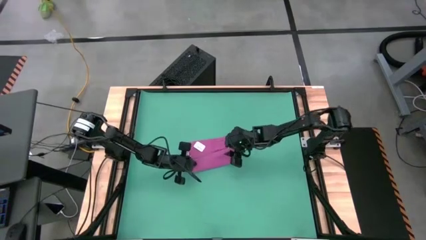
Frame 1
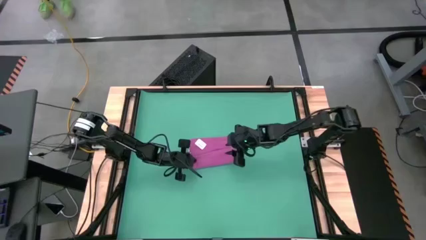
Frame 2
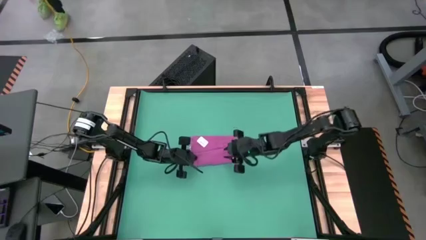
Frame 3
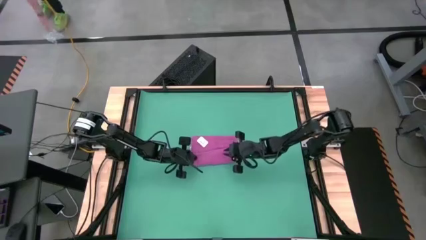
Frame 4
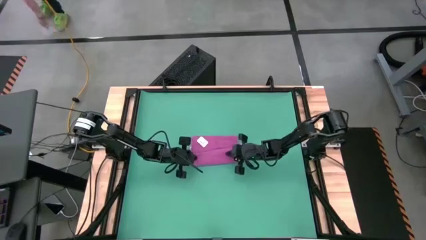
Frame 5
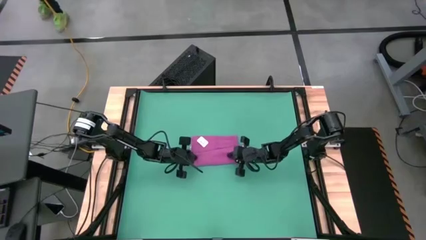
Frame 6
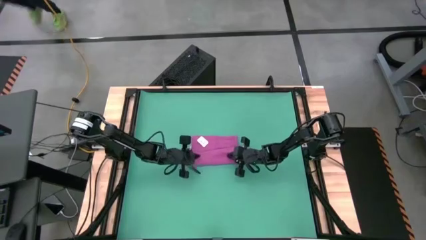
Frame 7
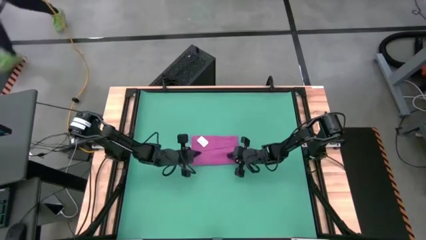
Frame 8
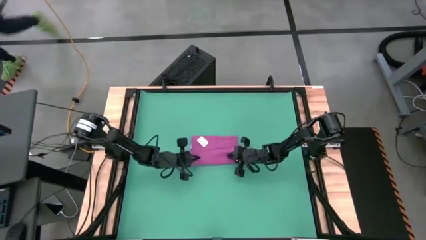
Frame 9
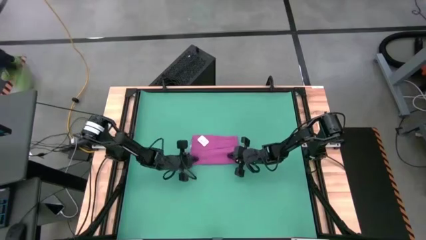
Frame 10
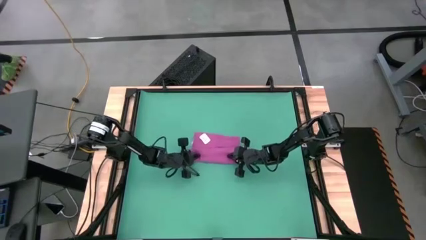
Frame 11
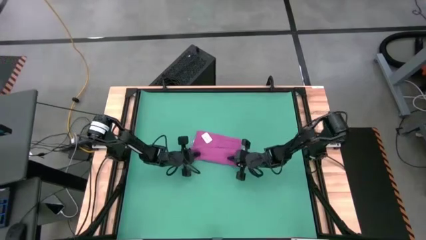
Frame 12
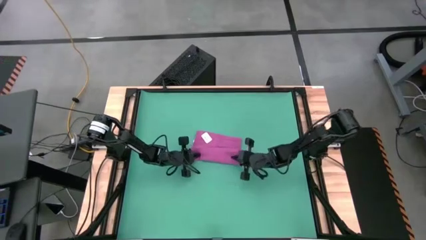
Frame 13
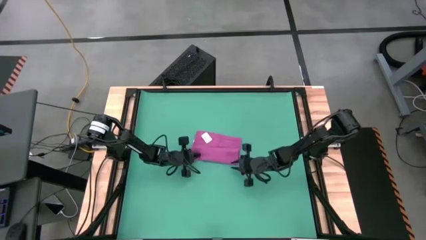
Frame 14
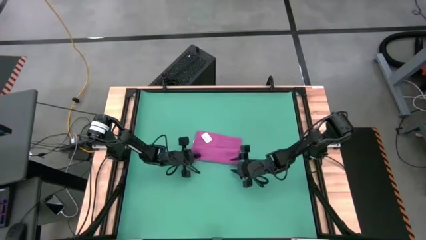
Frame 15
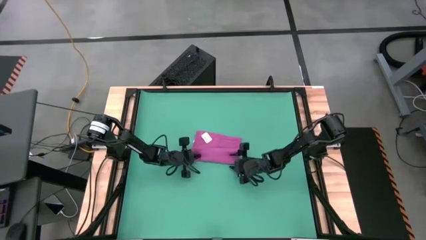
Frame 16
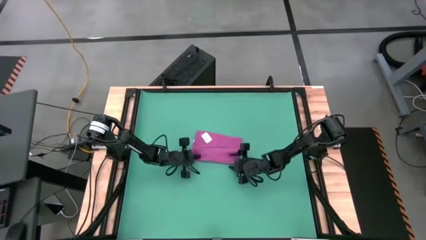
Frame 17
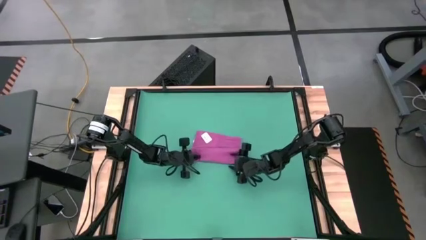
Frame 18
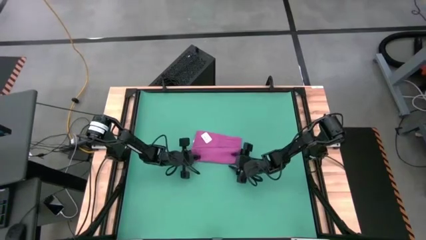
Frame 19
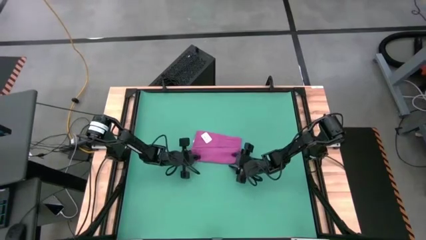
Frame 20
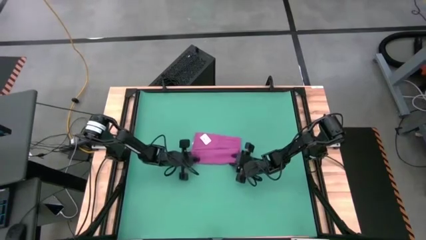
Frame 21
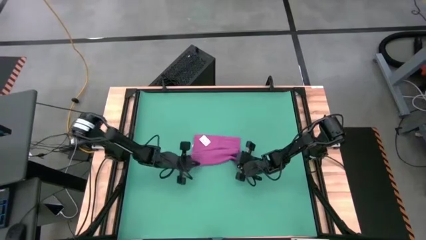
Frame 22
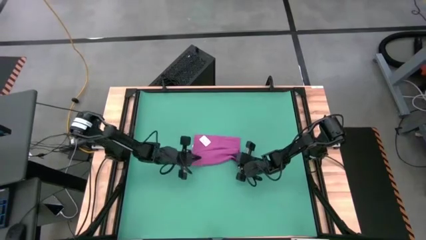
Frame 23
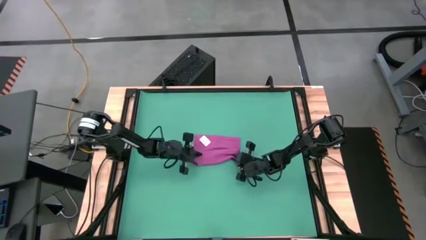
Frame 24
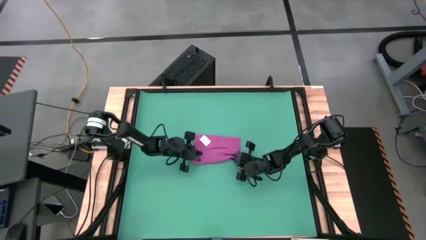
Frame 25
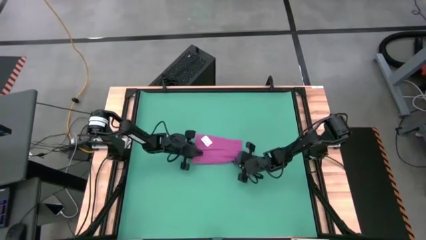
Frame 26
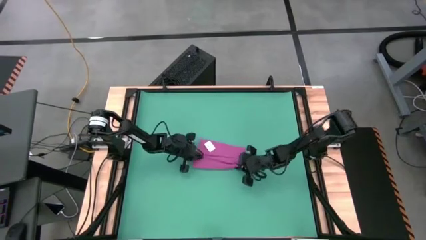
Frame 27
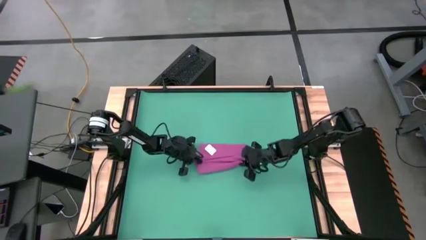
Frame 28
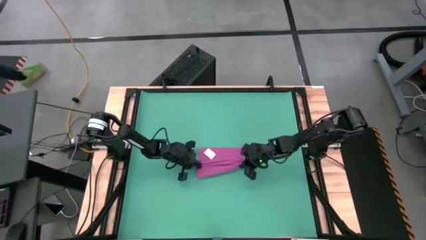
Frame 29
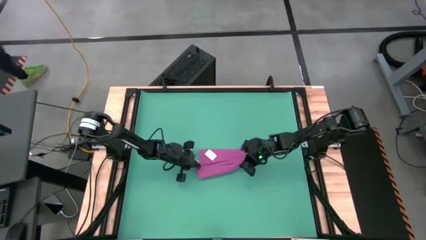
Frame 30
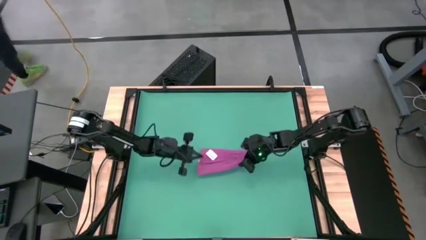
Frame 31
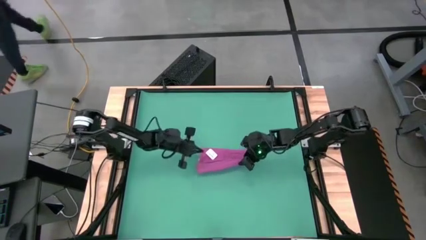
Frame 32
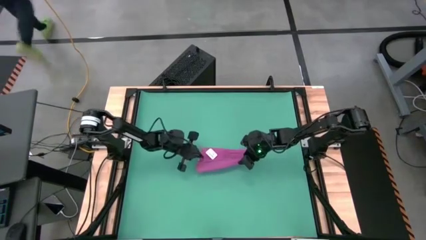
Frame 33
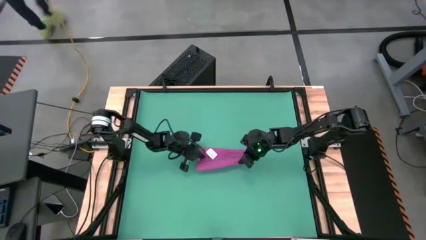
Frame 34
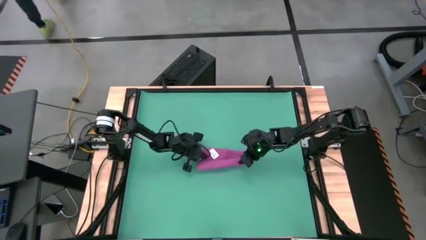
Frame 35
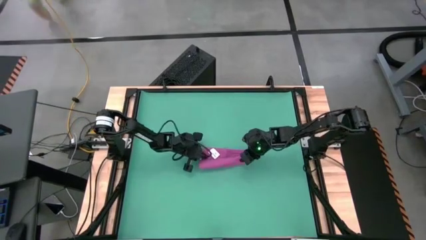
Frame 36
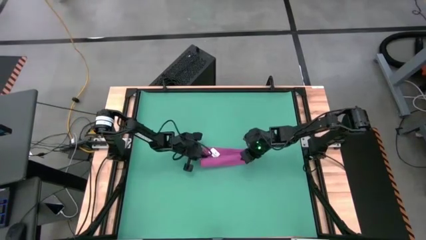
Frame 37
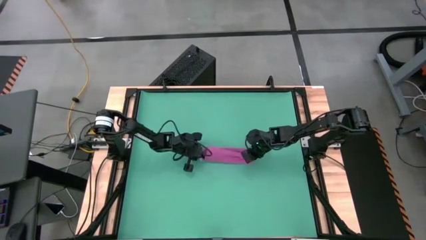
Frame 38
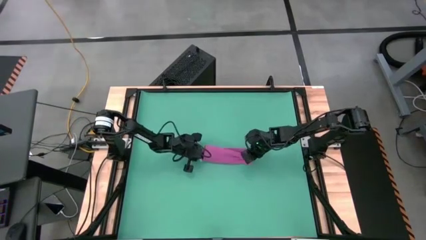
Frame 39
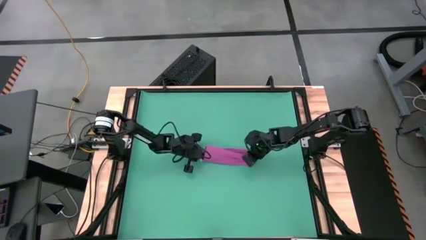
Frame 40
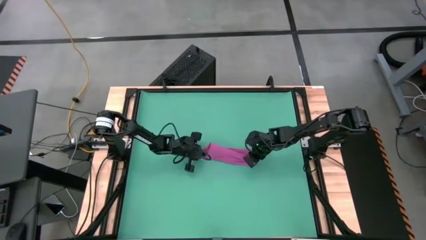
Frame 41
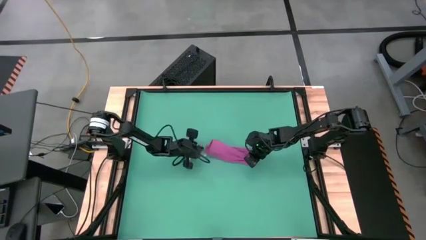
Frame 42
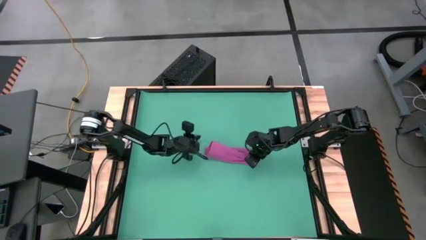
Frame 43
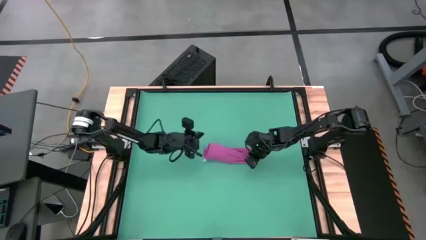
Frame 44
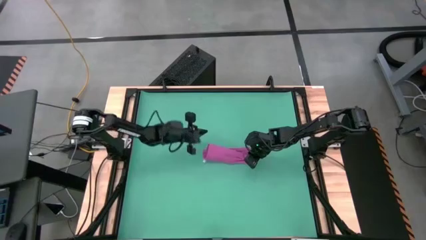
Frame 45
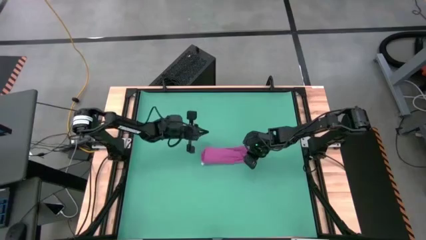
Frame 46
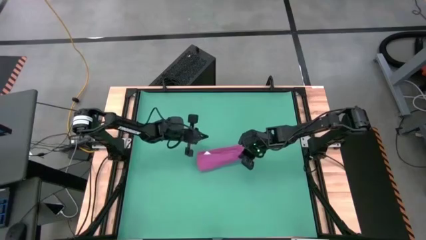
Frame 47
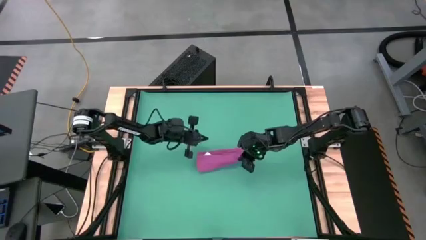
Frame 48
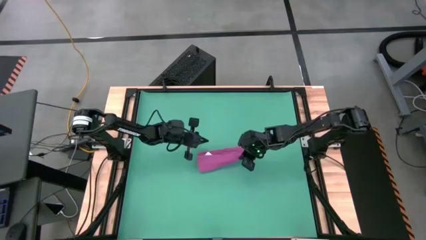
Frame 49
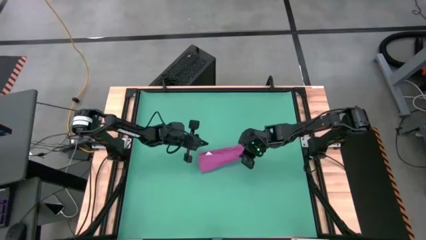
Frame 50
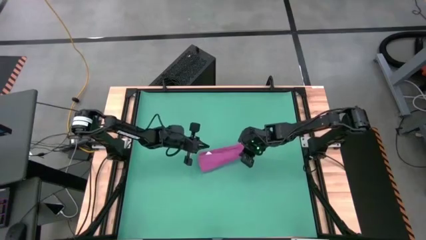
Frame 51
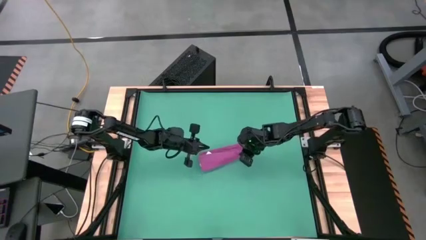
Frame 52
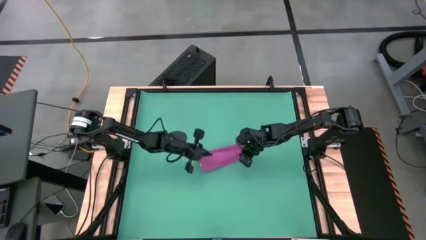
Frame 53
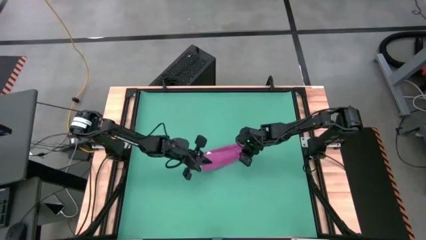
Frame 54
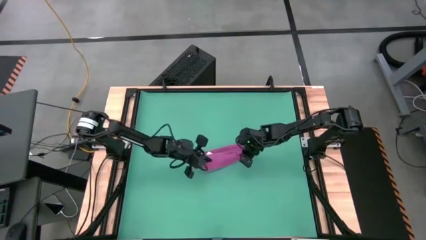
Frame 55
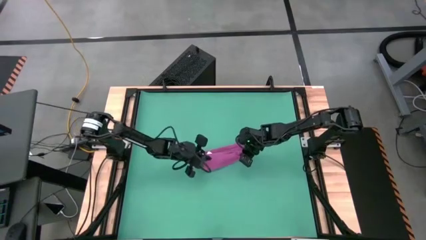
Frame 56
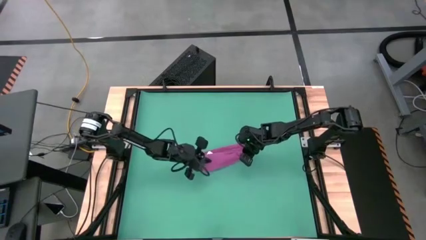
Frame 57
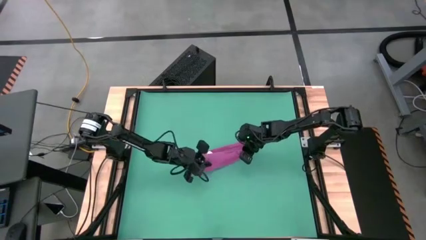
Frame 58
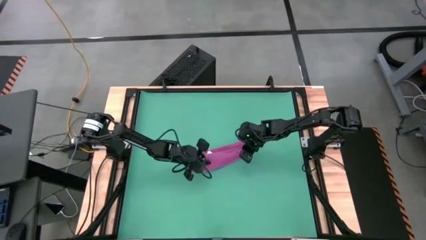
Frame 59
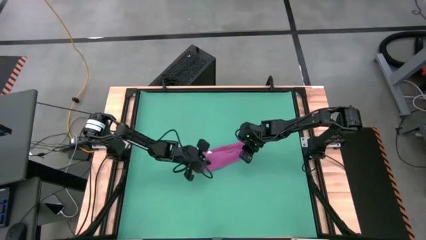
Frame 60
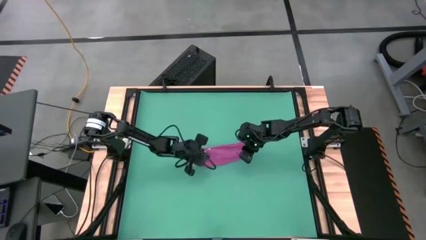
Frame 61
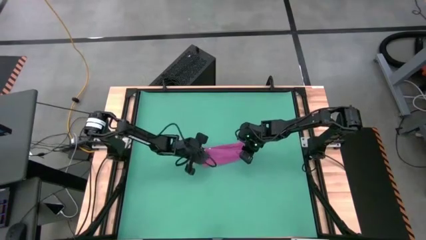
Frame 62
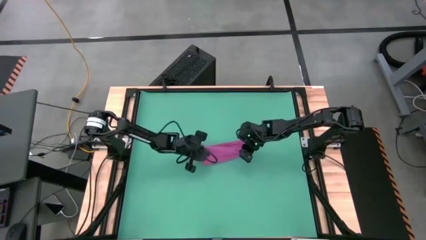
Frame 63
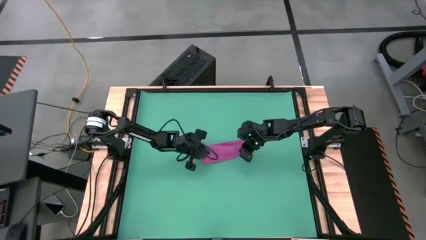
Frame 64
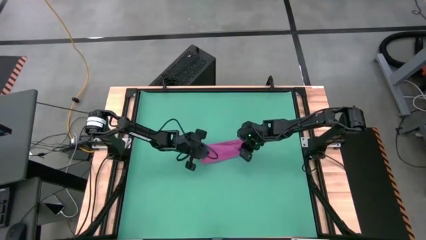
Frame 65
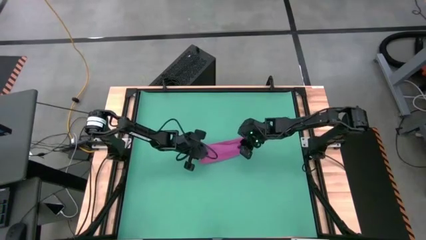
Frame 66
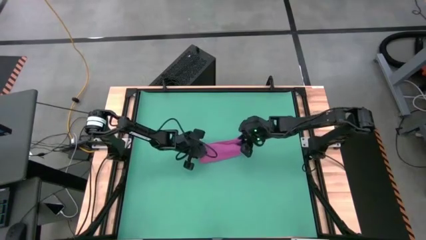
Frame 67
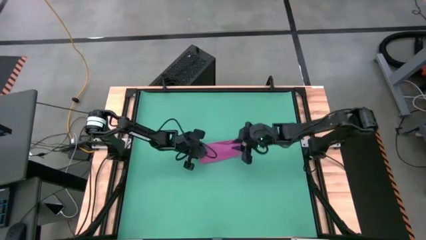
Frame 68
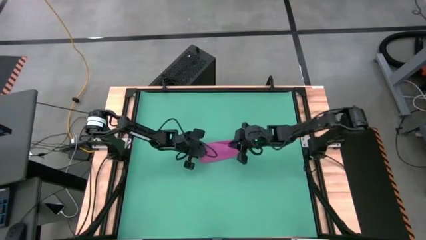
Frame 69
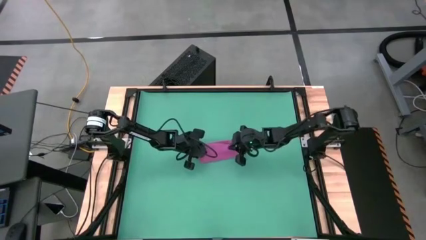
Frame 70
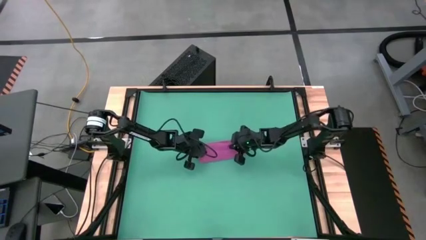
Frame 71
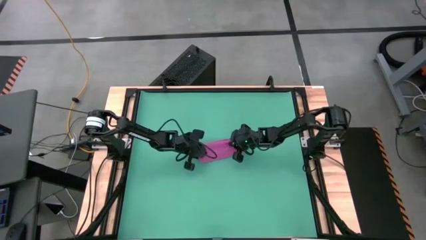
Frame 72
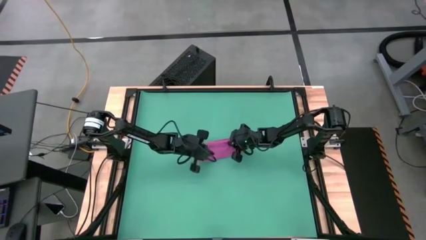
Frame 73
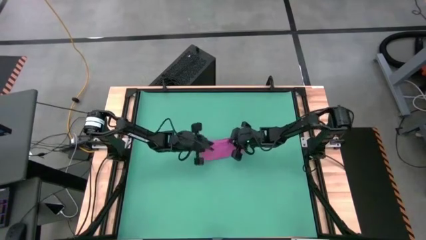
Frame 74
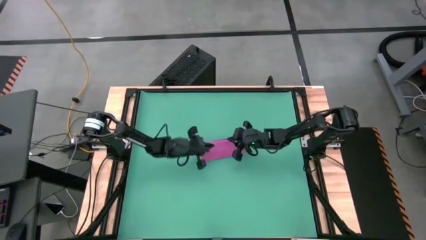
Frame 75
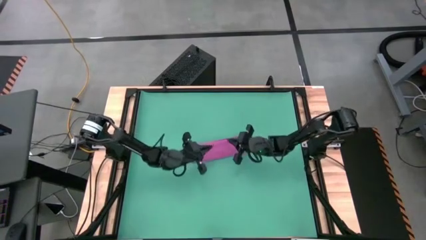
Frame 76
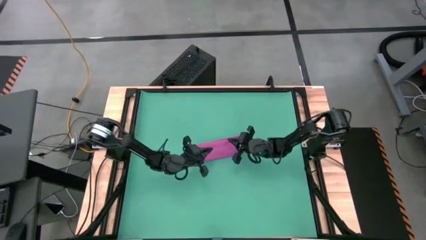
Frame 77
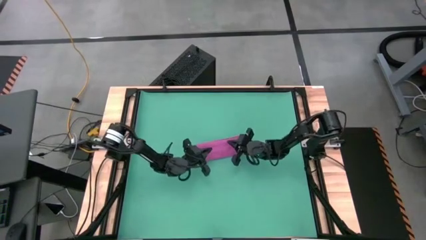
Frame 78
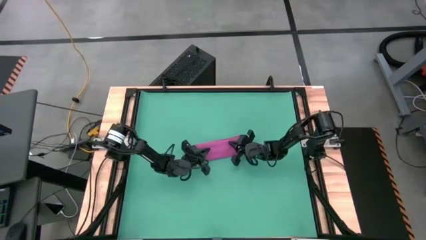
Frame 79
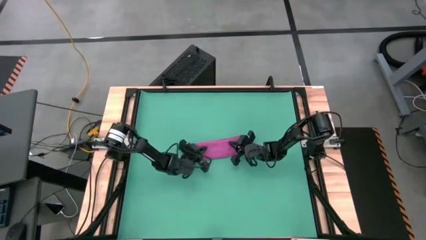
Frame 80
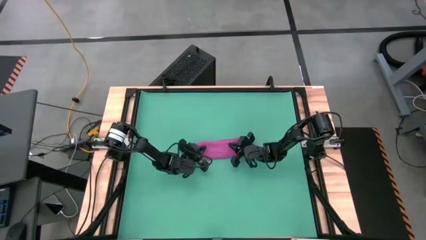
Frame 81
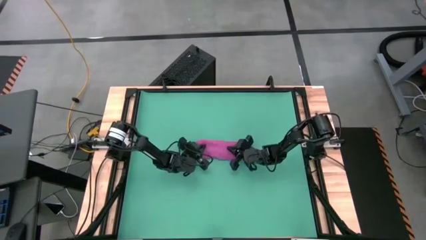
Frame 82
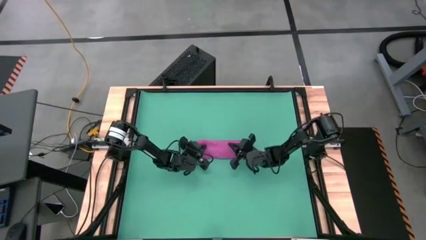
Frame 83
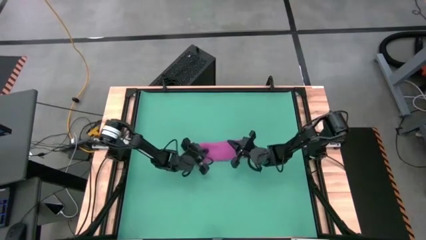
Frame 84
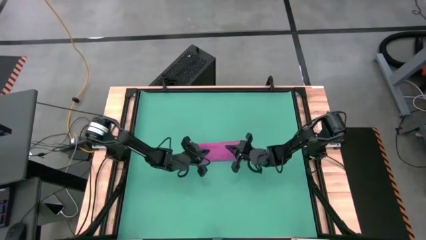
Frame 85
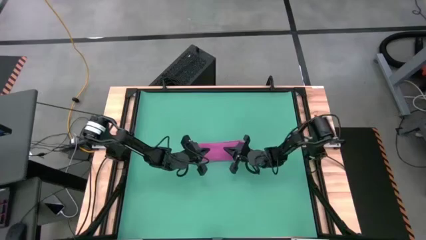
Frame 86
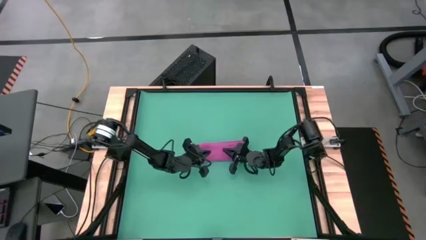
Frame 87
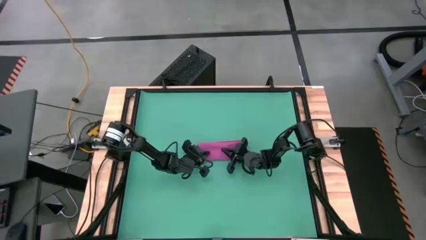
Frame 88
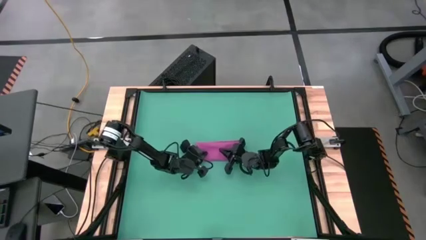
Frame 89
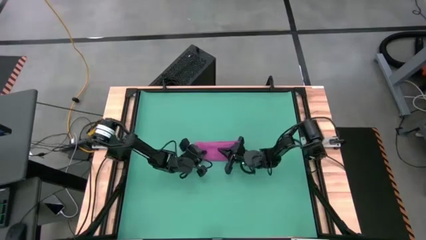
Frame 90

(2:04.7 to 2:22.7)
Task: Roll towel
Roll the violet towel
